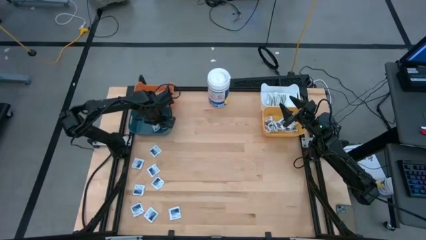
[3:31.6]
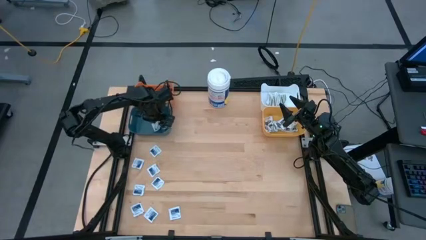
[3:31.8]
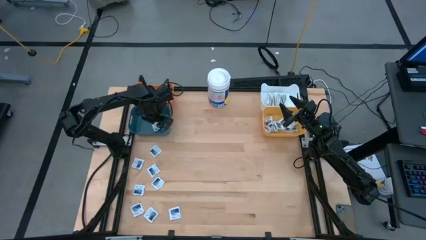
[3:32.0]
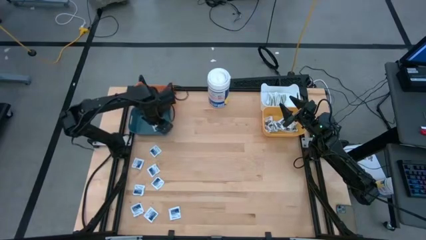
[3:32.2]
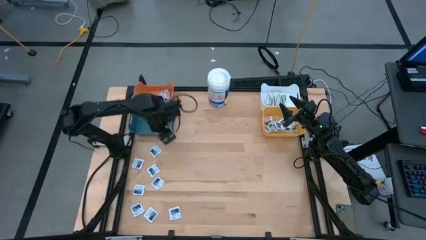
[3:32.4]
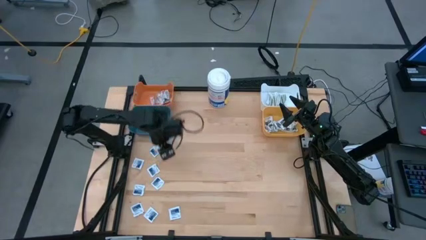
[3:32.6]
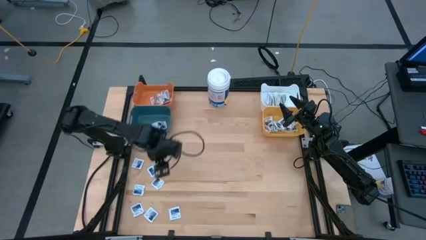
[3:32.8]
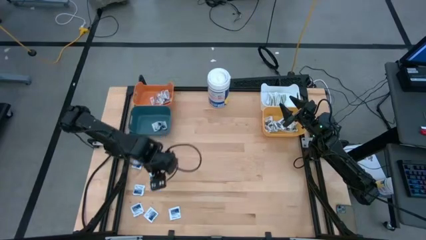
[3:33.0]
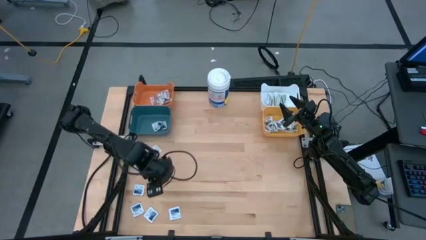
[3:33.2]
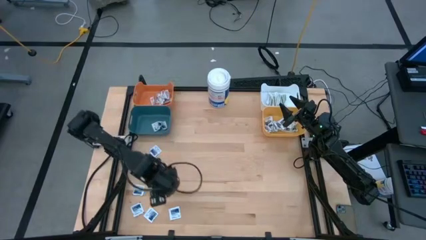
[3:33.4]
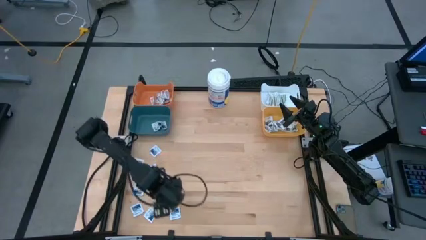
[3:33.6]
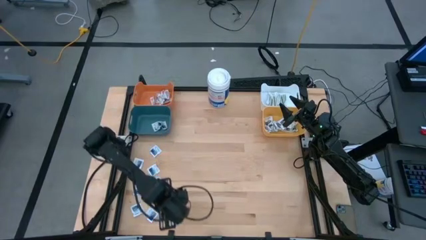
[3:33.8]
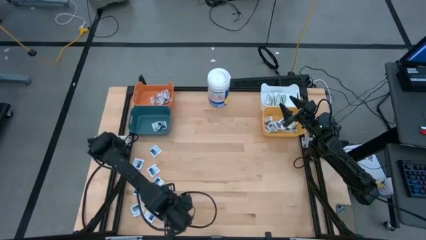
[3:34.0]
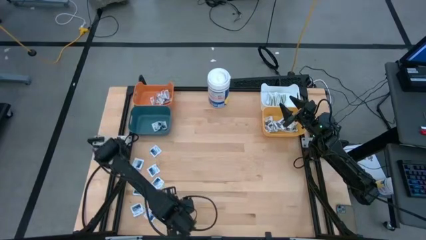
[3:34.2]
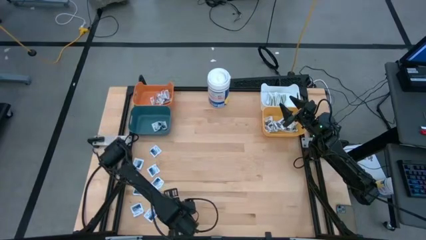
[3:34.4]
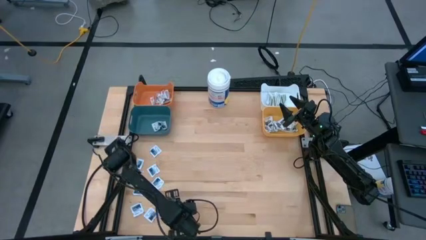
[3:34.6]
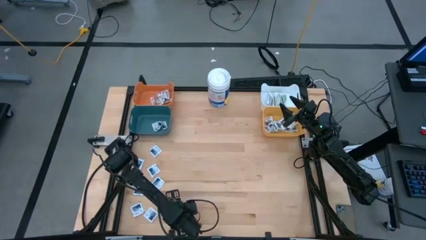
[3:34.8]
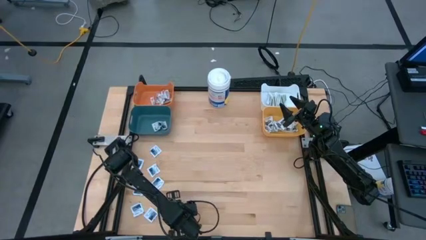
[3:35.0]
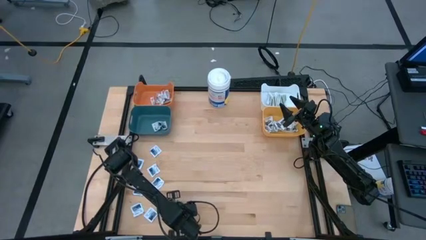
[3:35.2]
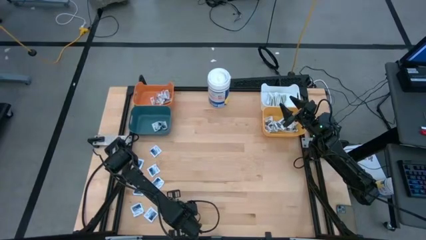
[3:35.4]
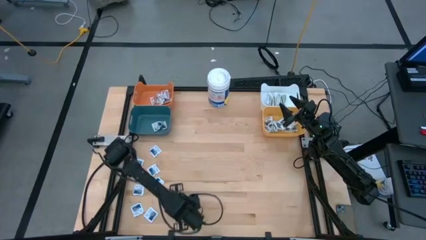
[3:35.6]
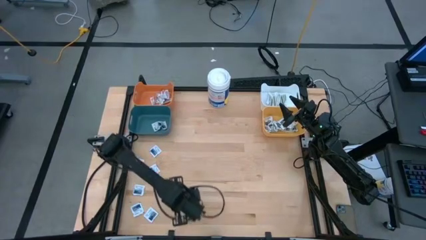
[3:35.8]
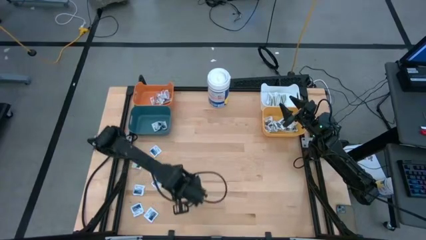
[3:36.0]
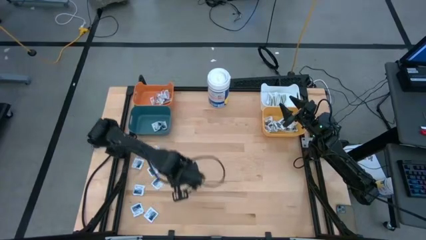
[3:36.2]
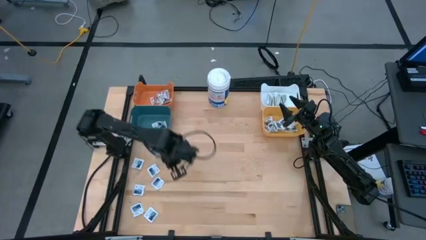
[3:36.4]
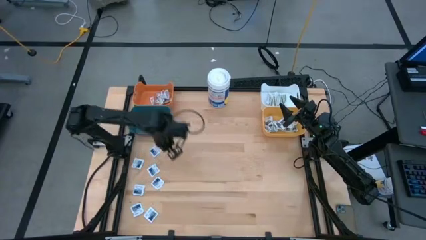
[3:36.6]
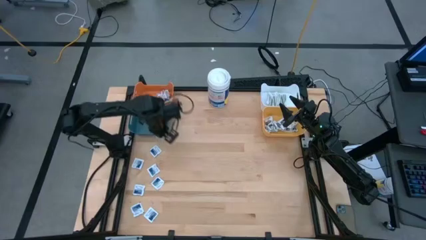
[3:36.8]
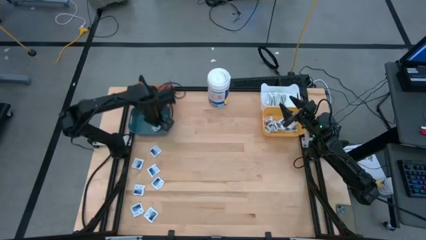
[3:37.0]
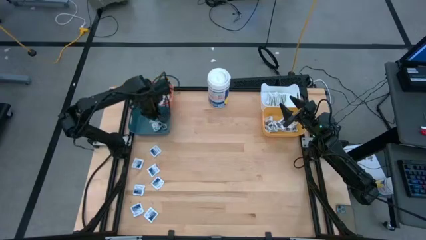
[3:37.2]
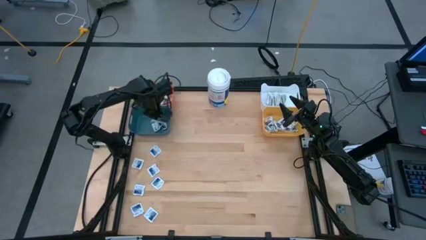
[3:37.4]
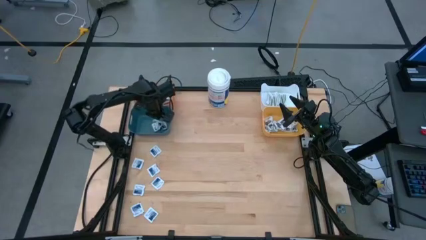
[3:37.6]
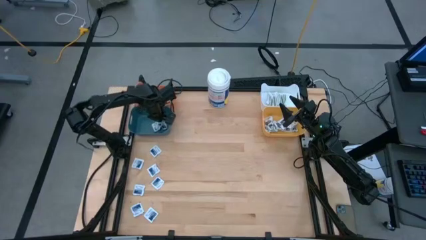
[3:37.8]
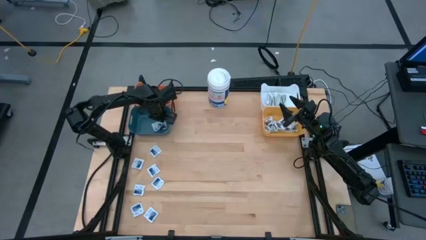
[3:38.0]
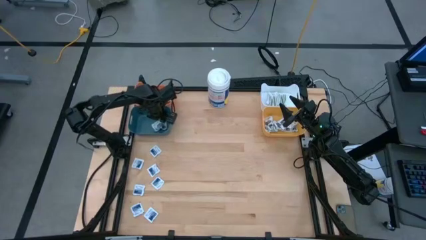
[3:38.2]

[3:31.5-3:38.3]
Task: Pick & Place First Aid Supplies
Put the blue pad into the blue bin

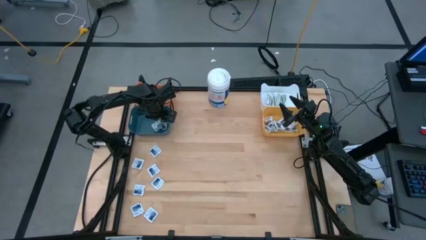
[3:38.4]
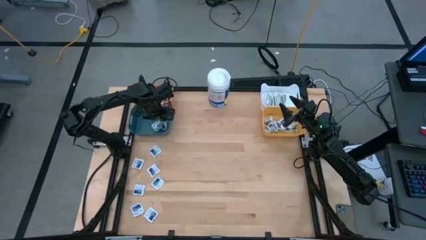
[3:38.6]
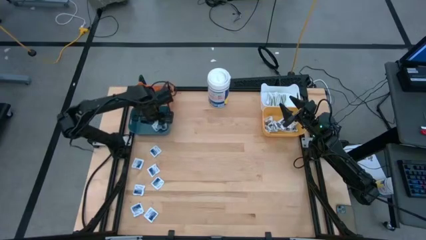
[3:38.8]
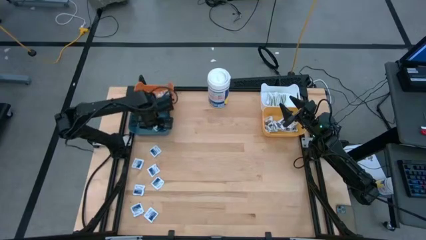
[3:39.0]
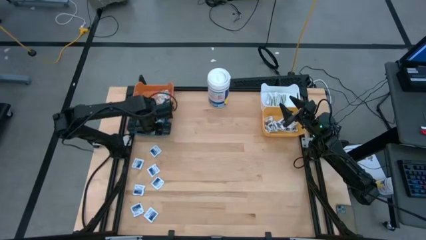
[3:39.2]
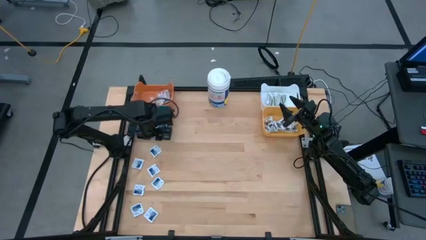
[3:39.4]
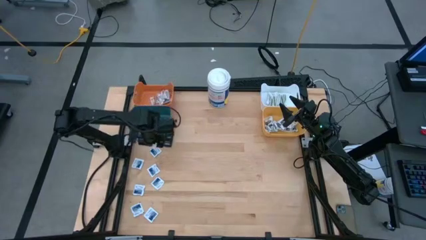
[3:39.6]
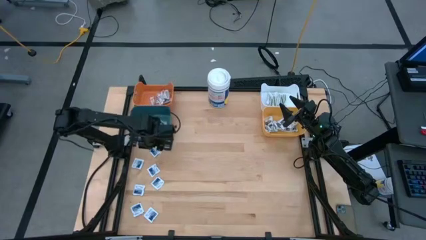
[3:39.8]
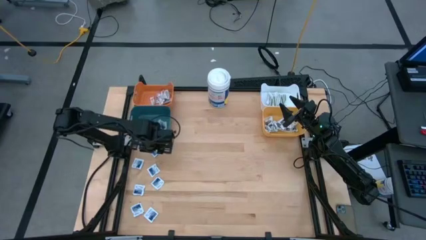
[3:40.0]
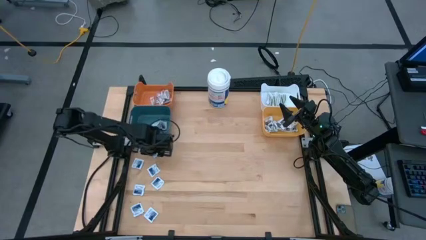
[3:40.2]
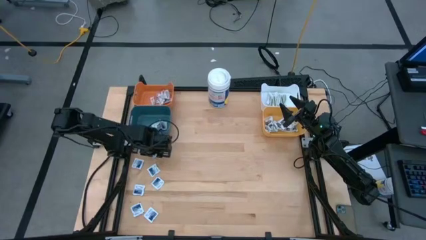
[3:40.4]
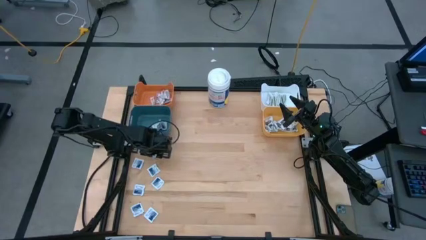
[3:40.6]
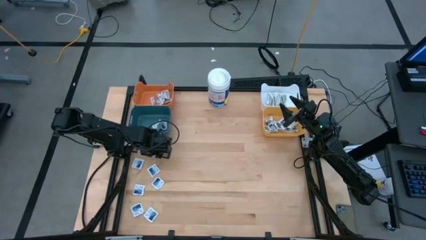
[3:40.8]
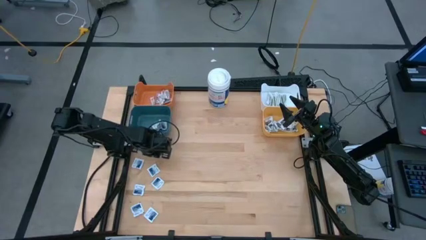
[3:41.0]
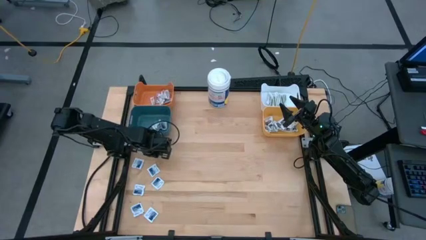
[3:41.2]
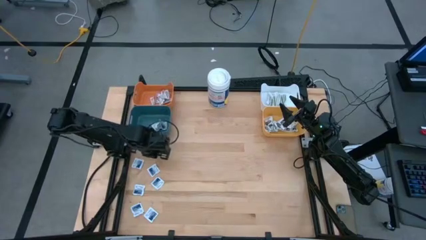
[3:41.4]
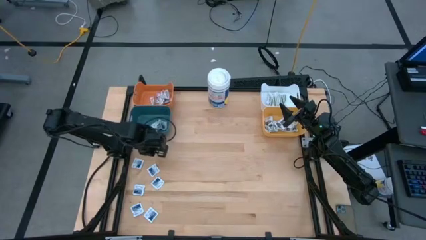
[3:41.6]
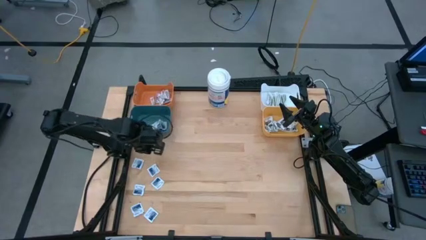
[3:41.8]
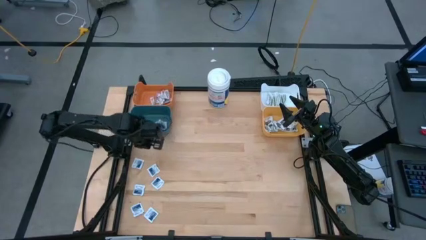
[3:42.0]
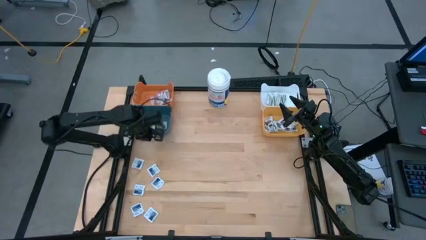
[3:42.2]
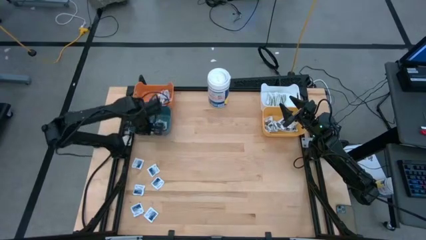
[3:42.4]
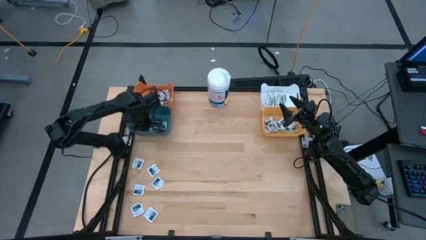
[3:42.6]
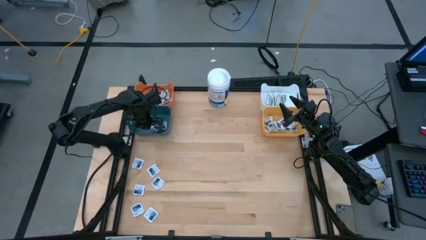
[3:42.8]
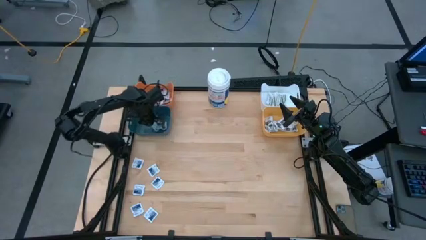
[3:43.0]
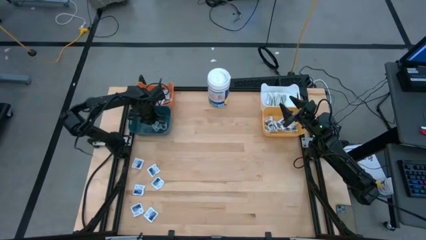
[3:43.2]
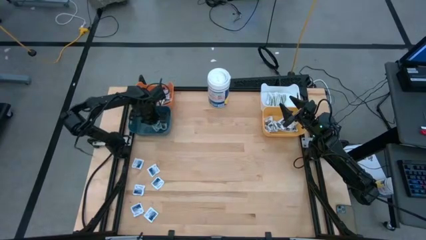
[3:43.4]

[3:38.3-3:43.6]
Put the blue pad into the blue bin

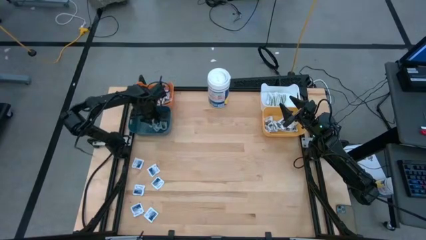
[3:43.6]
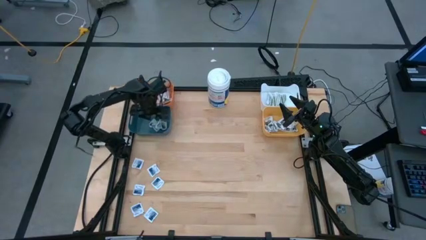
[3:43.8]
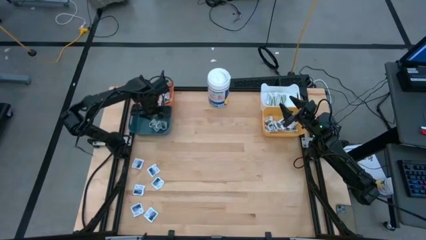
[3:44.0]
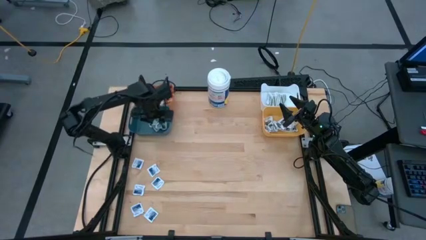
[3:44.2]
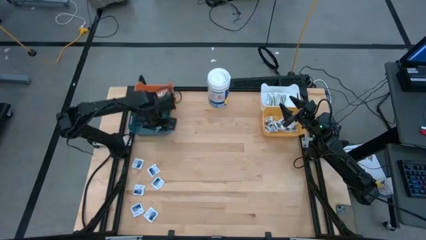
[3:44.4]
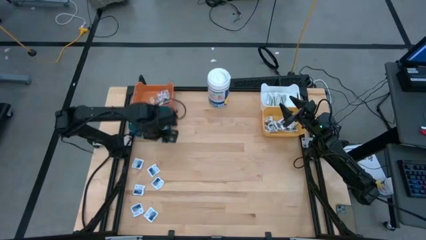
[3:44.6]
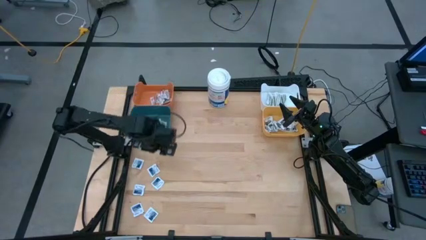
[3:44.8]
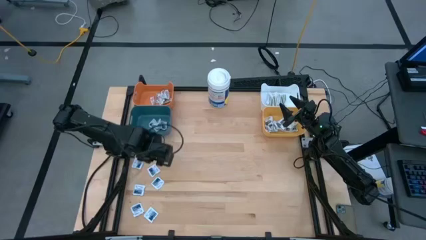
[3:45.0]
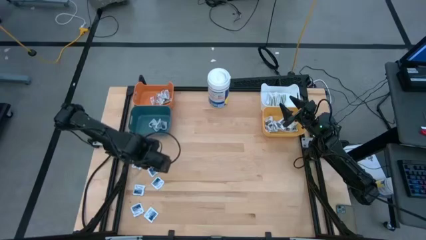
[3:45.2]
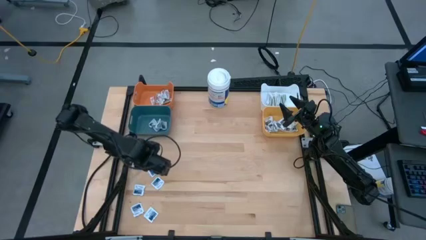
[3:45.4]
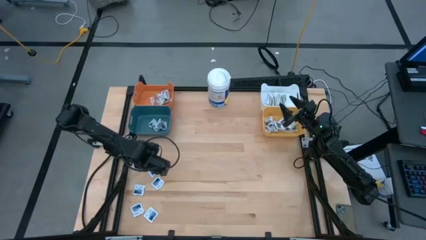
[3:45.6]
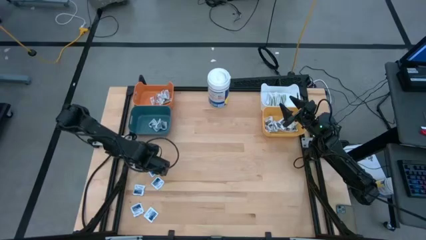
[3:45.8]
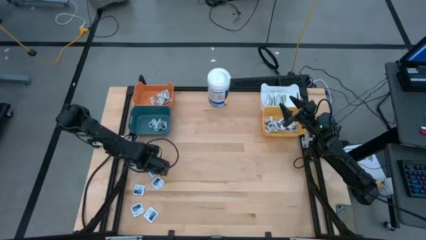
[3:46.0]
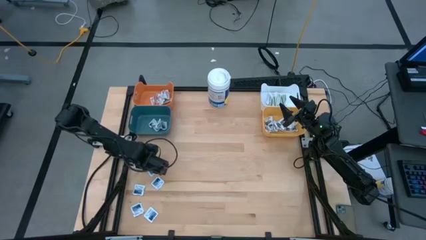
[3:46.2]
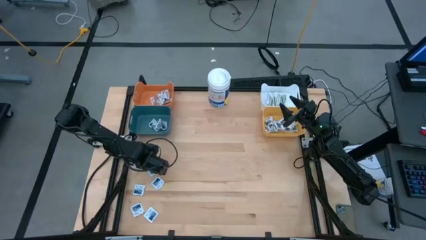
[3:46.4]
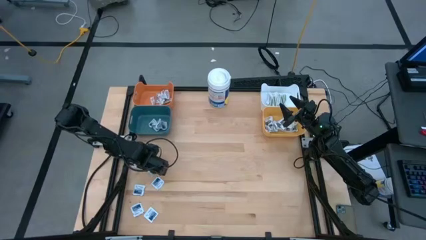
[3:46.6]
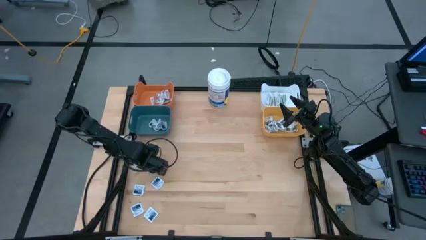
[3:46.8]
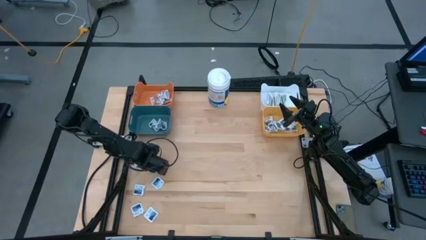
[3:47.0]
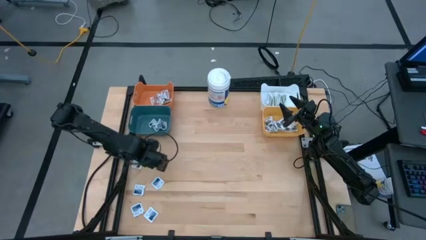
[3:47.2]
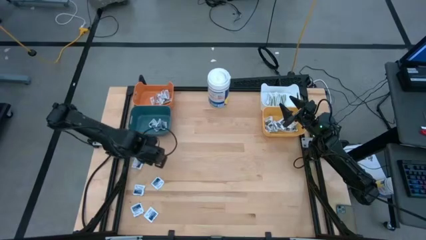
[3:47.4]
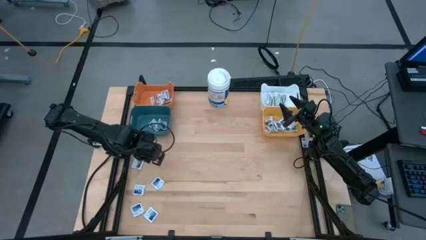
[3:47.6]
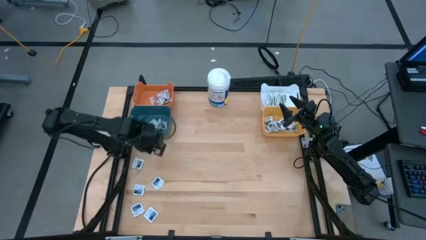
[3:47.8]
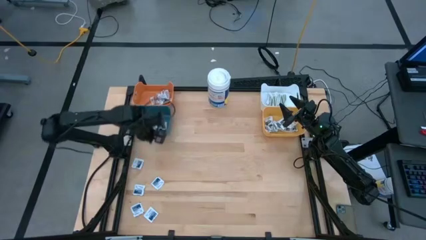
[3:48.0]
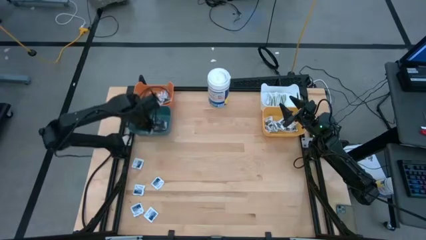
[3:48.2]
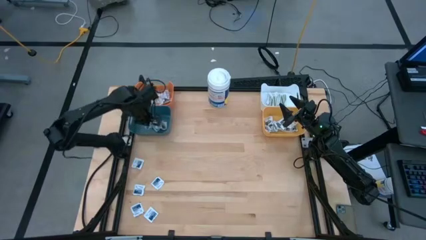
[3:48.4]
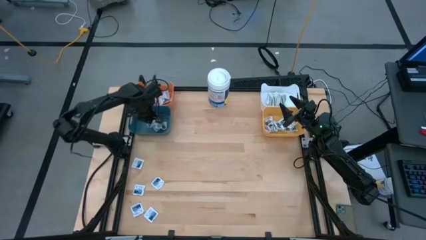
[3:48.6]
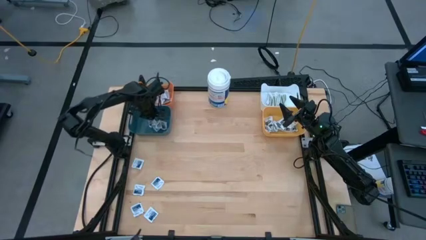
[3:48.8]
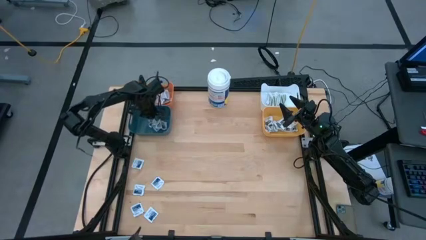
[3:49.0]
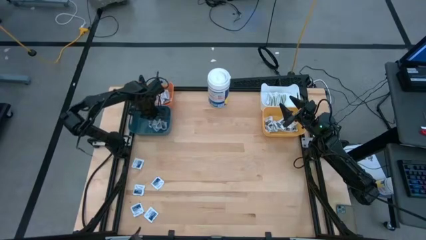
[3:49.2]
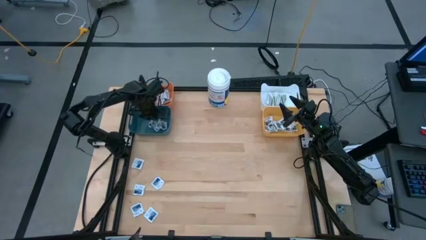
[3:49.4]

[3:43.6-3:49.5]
Put the blue pad into the blue bin
